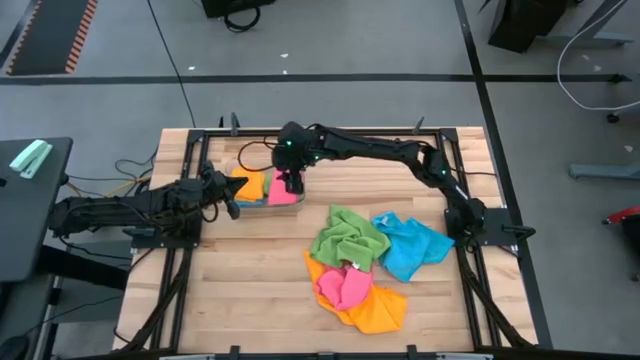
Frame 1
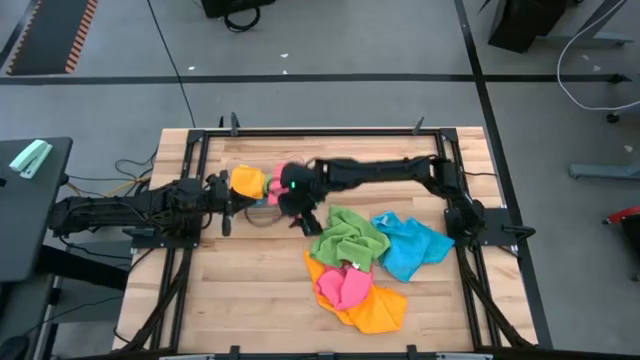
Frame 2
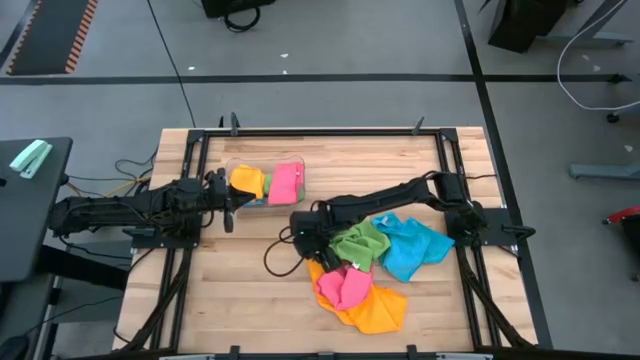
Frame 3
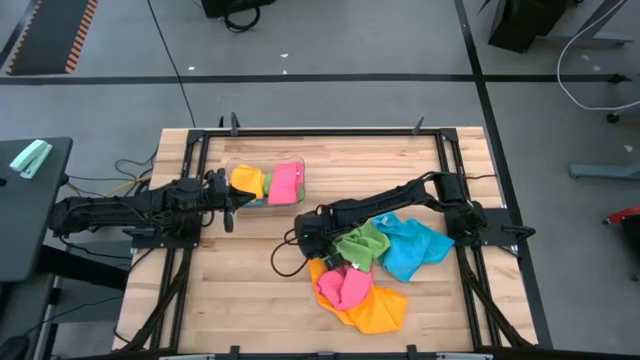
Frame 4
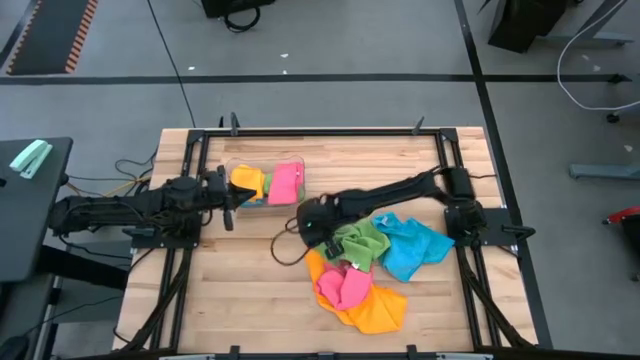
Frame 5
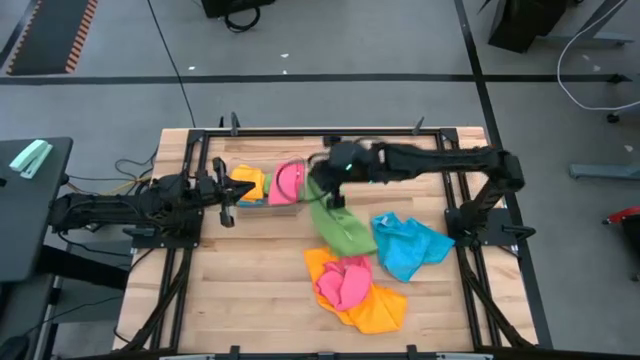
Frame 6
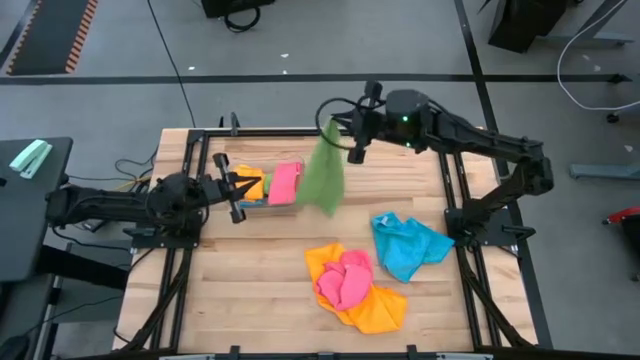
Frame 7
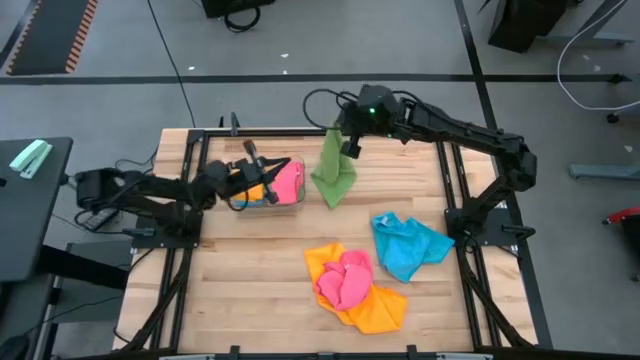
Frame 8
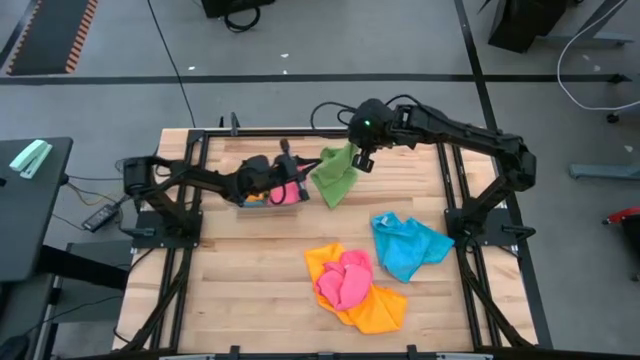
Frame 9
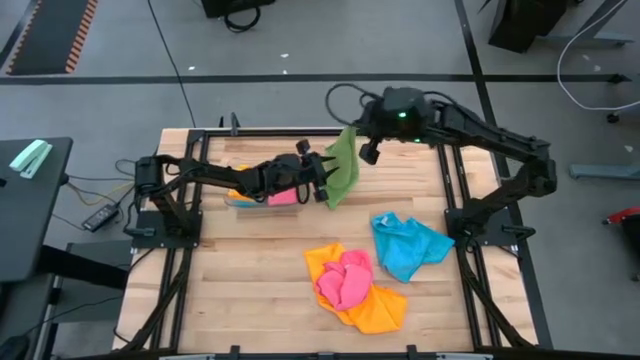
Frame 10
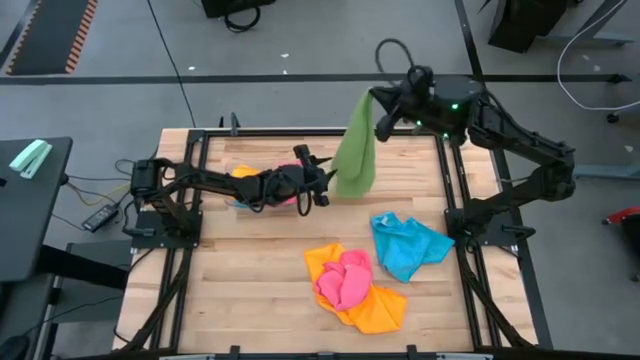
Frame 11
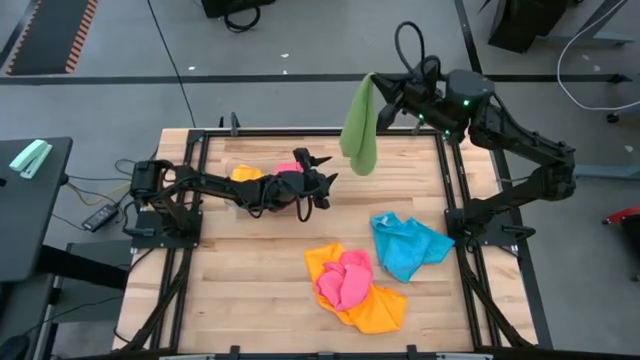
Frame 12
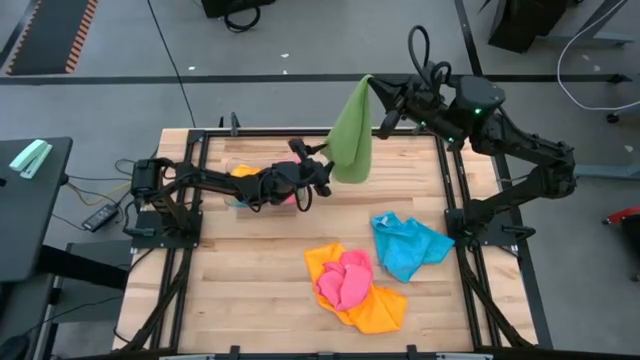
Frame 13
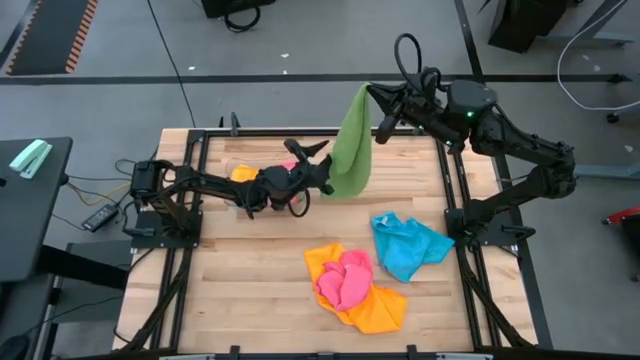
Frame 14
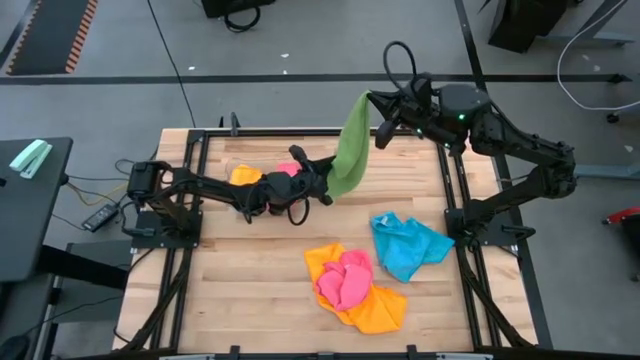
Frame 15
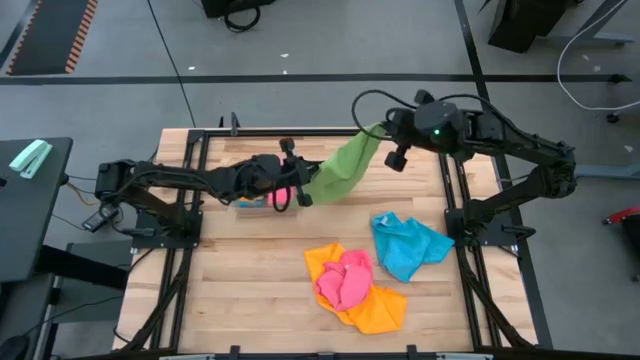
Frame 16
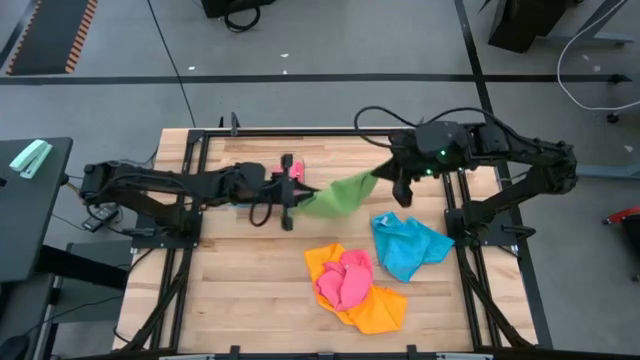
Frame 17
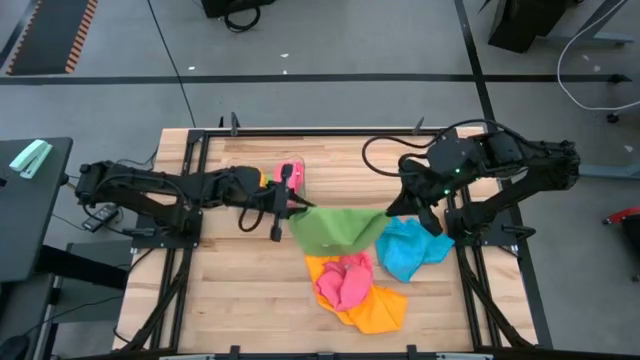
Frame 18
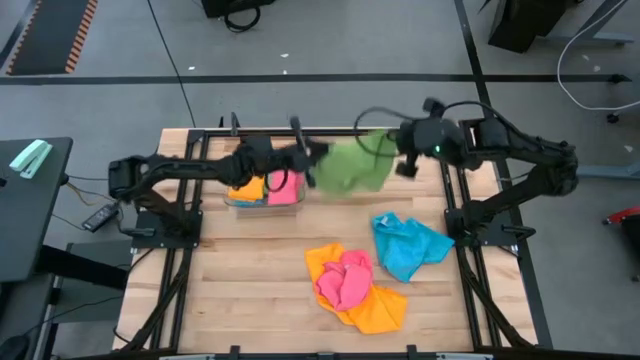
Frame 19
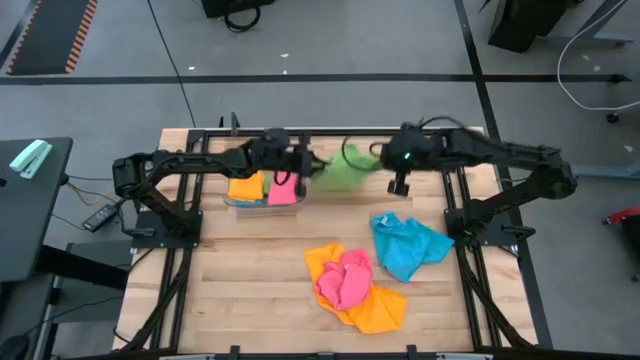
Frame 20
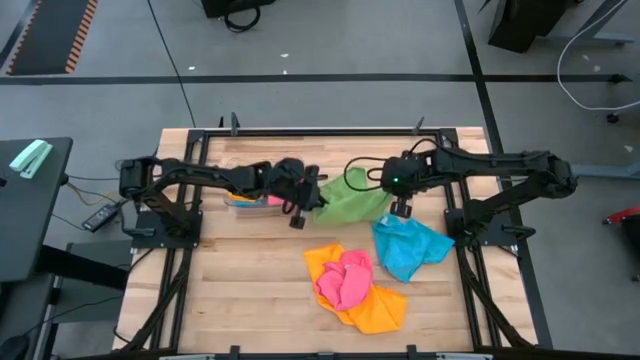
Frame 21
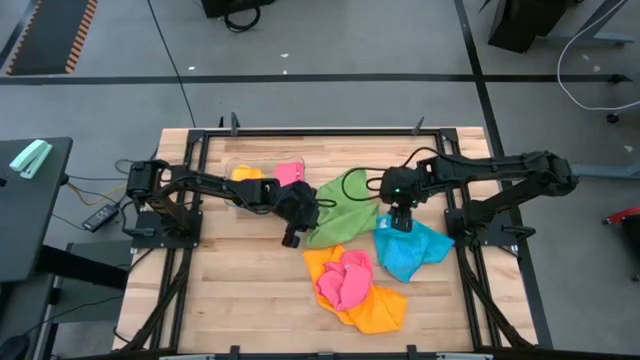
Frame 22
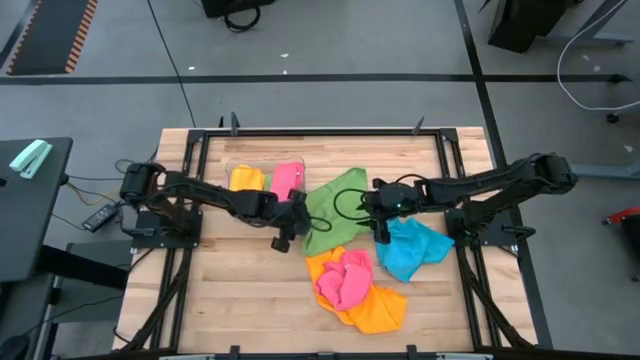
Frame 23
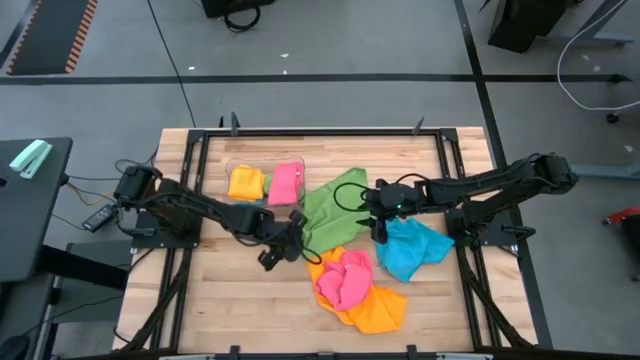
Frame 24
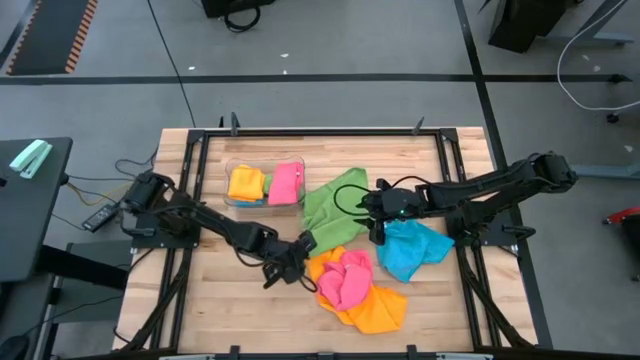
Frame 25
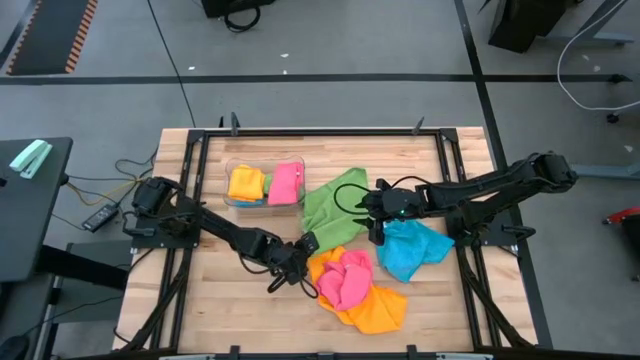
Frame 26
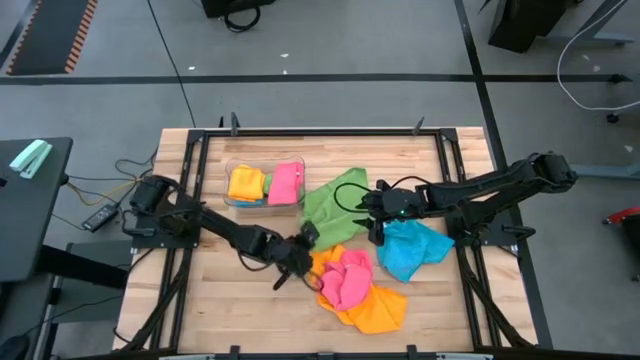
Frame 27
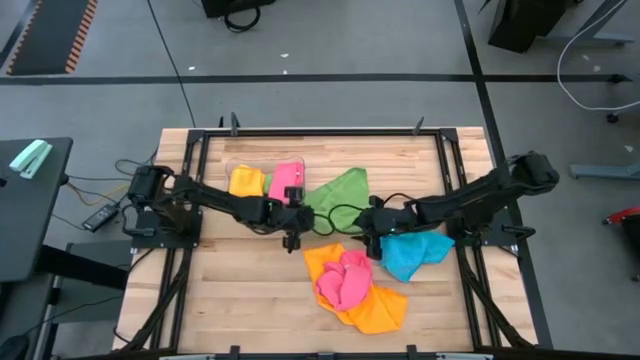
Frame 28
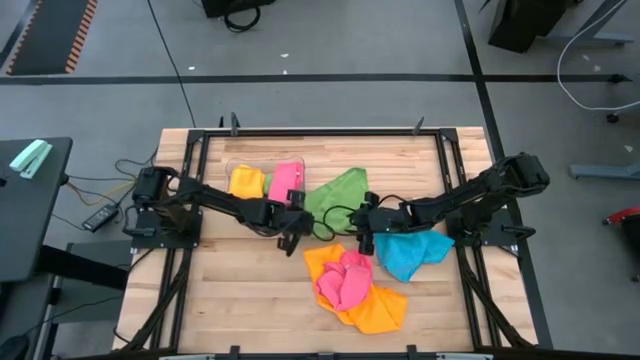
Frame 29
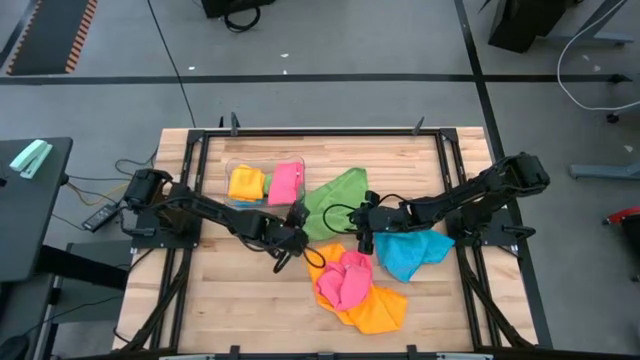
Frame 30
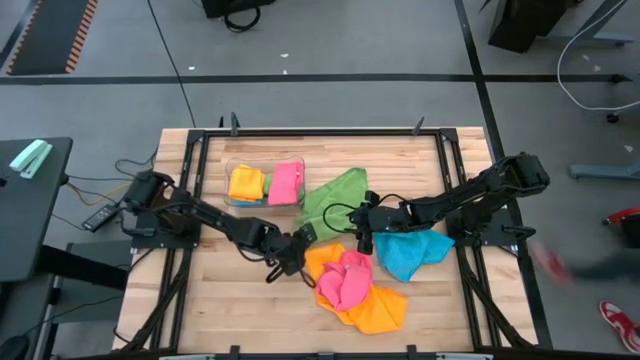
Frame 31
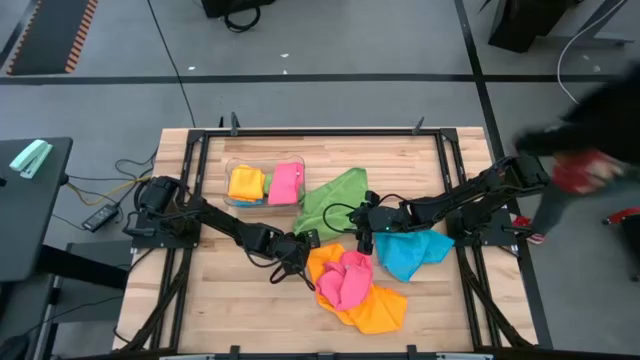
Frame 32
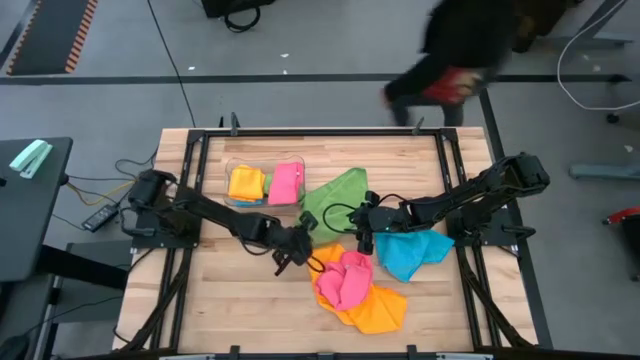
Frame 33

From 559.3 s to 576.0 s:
Task: Fold microfiber towels
Fold the green microfiber towel

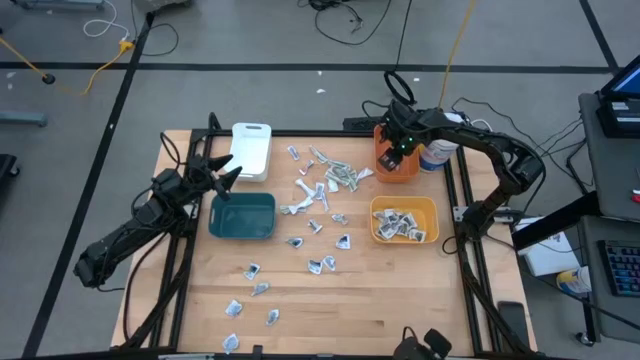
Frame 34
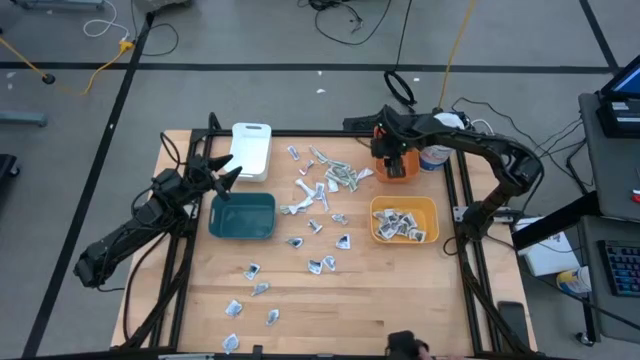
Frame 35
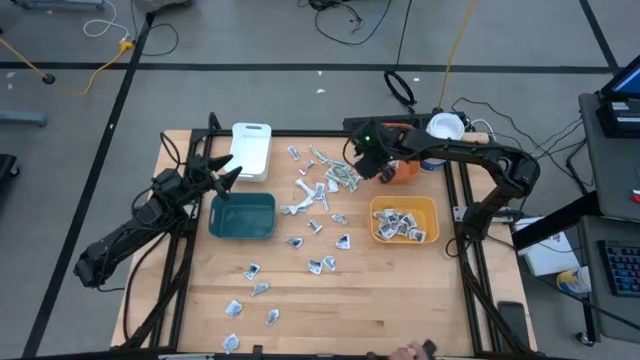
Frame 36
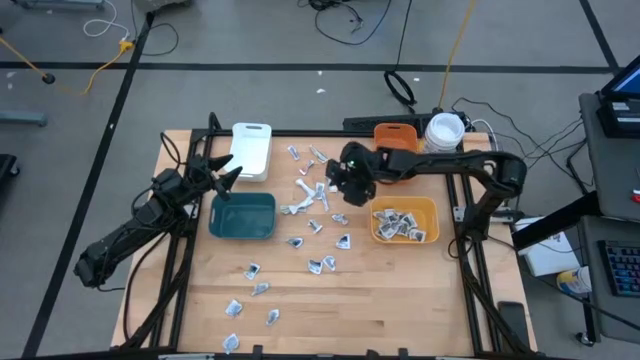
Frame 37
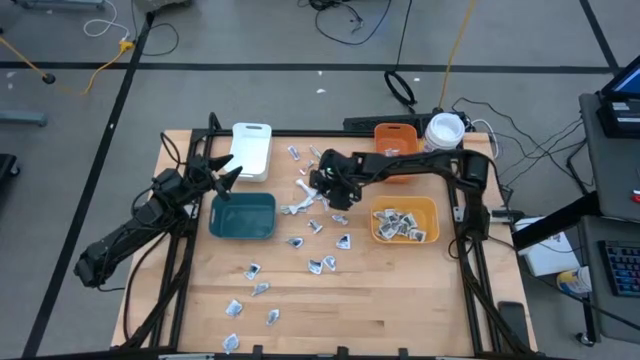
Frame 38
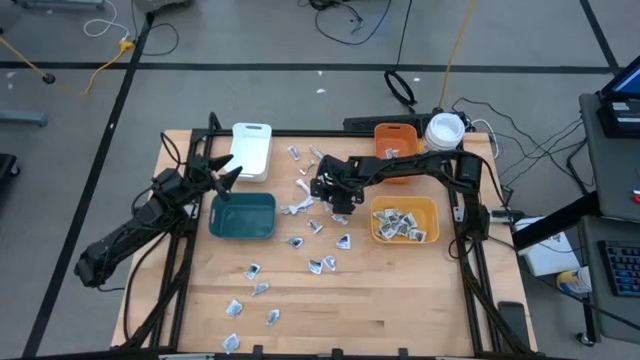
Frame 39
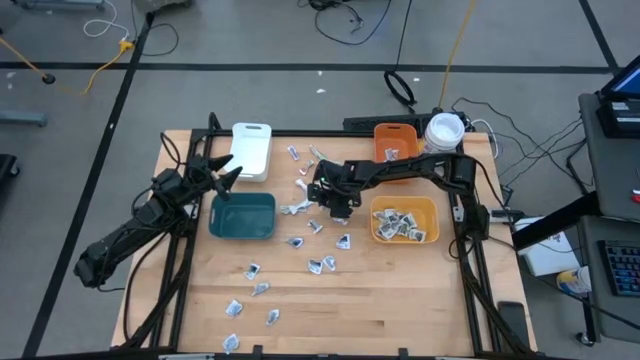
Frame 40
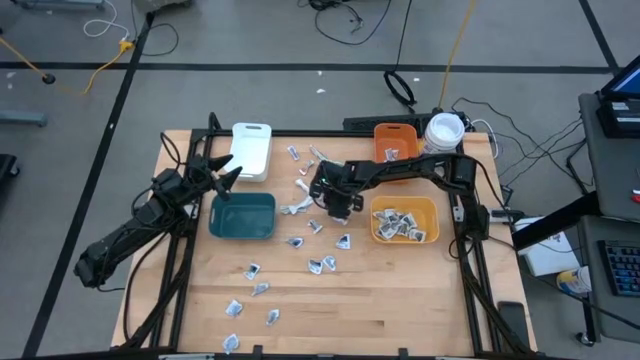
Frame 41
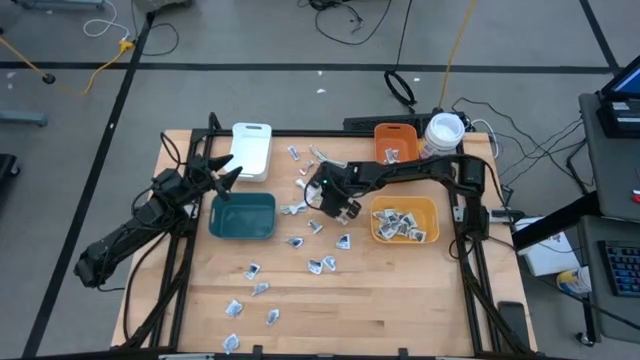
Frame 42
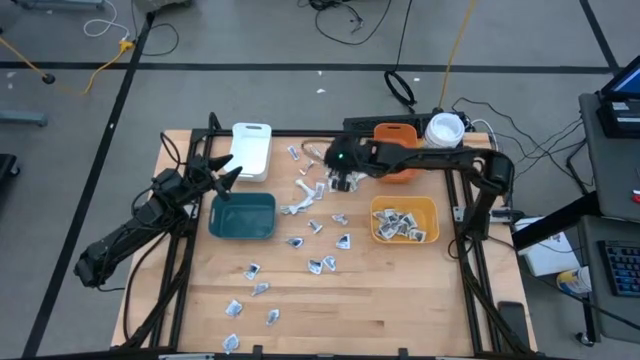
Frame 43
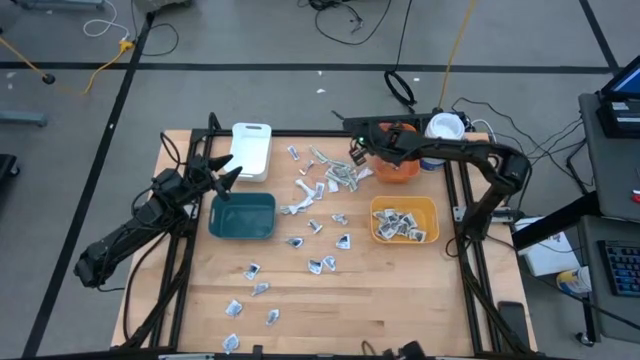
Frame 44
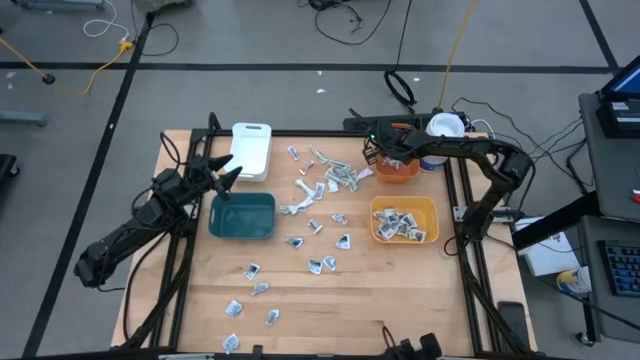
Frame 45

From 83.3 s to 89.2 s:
Task: Pick & Place First Aid Supplies
Put the antibiotic ointment into the orange bin
